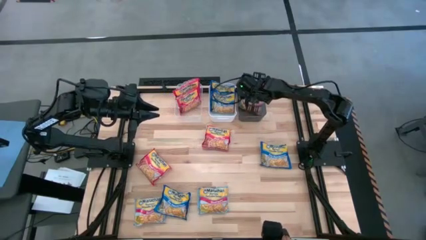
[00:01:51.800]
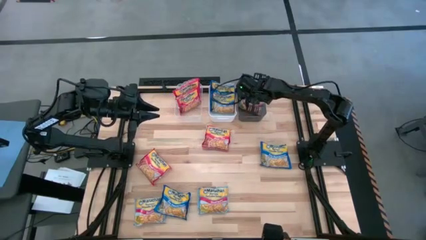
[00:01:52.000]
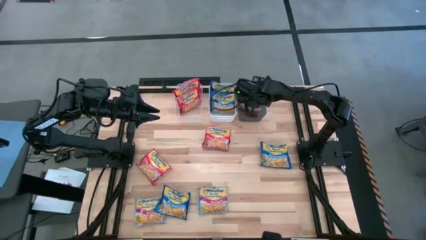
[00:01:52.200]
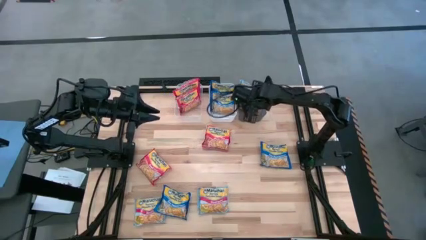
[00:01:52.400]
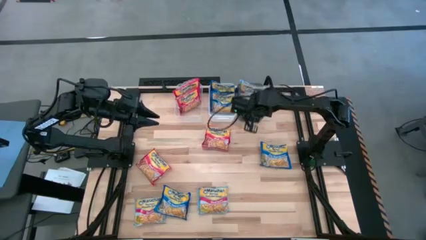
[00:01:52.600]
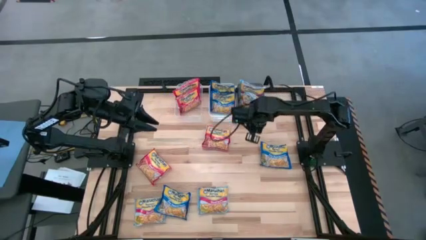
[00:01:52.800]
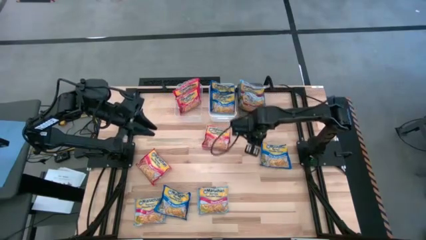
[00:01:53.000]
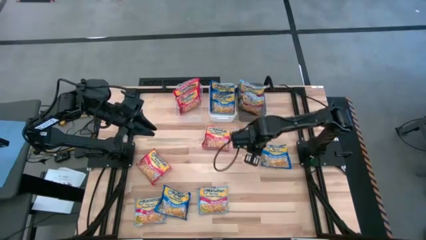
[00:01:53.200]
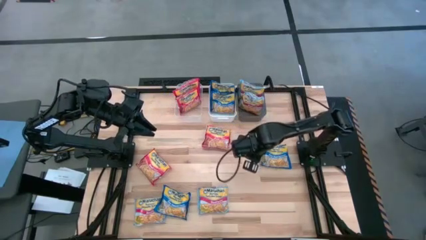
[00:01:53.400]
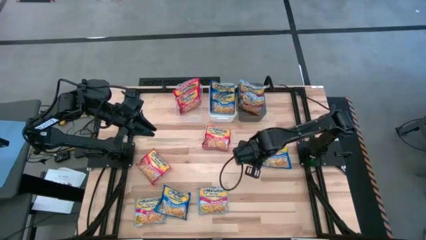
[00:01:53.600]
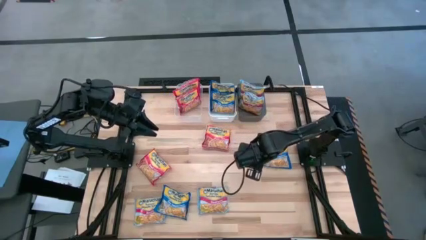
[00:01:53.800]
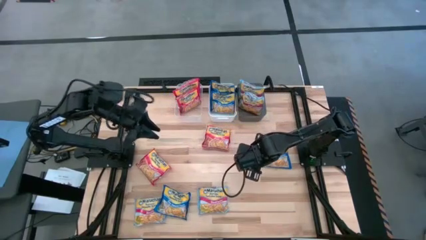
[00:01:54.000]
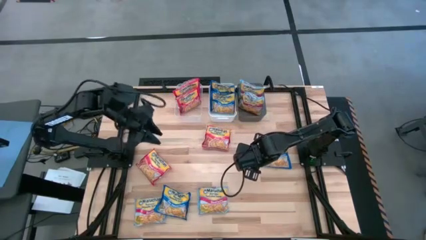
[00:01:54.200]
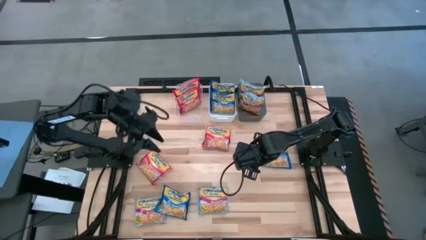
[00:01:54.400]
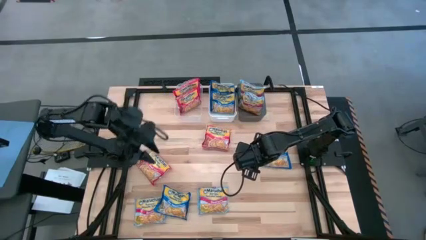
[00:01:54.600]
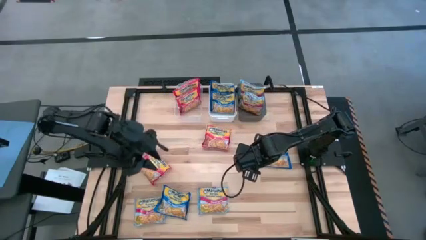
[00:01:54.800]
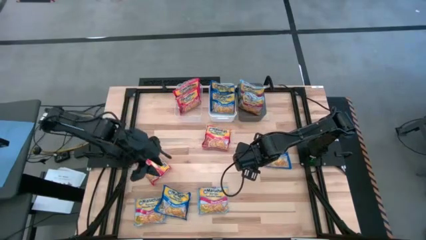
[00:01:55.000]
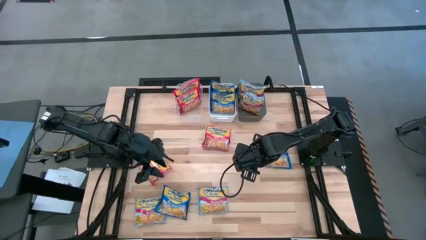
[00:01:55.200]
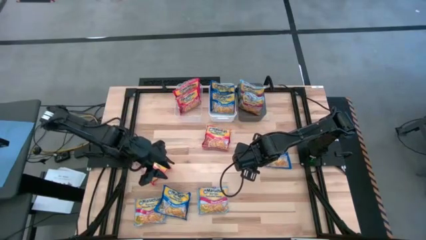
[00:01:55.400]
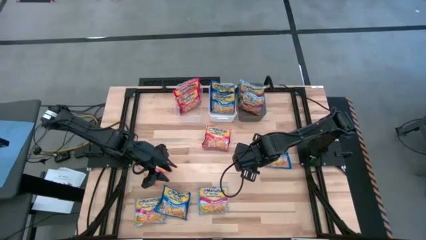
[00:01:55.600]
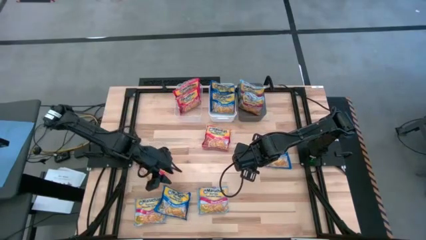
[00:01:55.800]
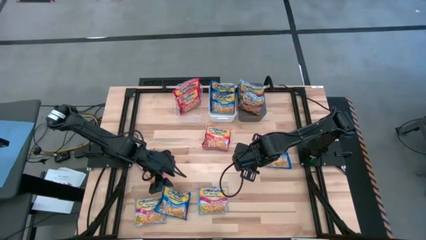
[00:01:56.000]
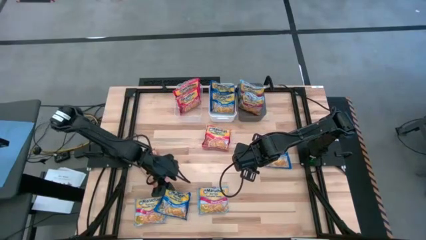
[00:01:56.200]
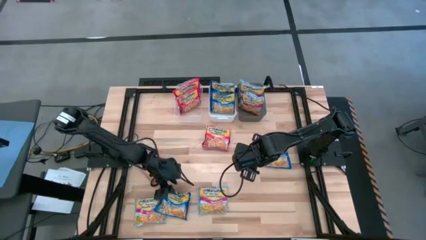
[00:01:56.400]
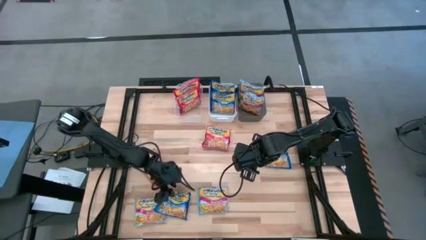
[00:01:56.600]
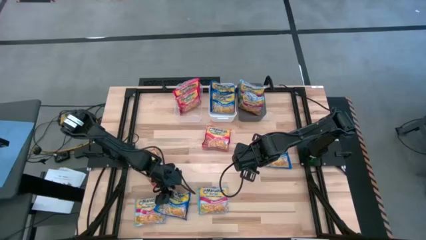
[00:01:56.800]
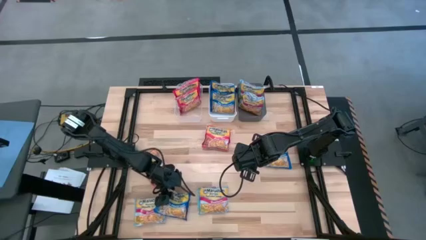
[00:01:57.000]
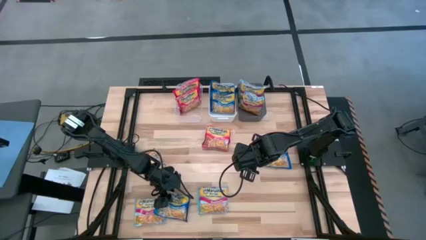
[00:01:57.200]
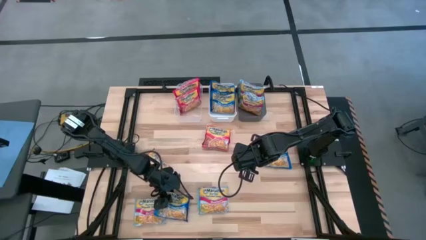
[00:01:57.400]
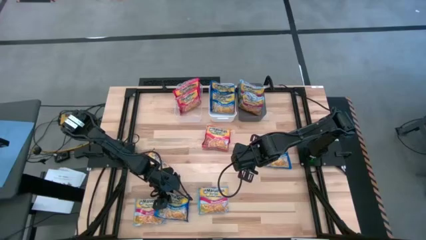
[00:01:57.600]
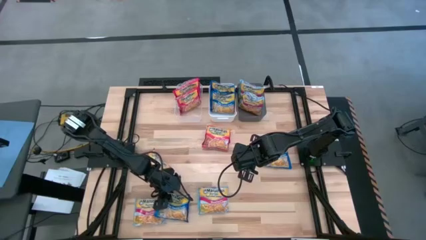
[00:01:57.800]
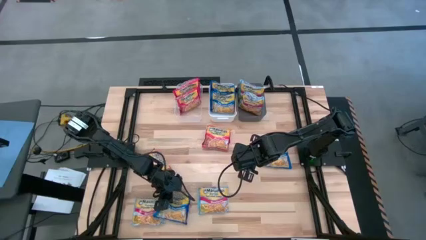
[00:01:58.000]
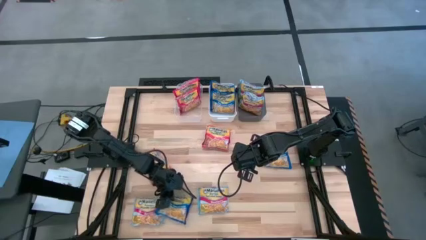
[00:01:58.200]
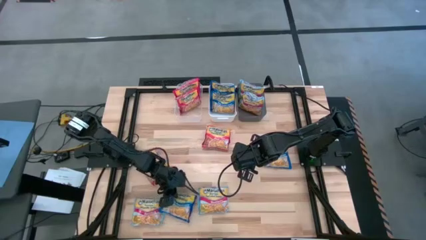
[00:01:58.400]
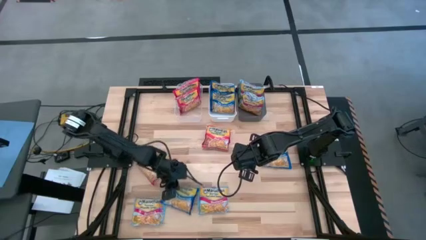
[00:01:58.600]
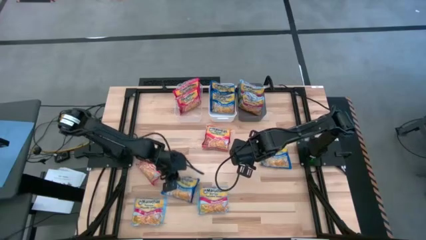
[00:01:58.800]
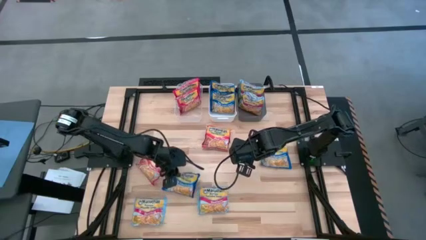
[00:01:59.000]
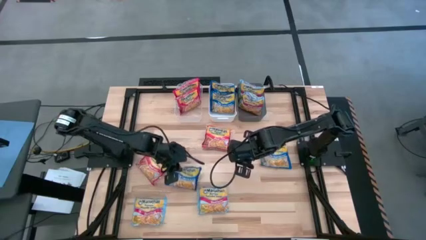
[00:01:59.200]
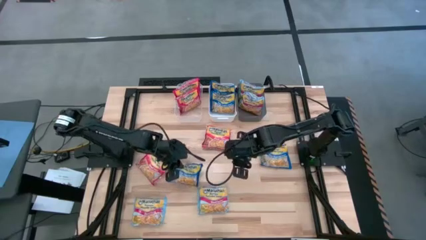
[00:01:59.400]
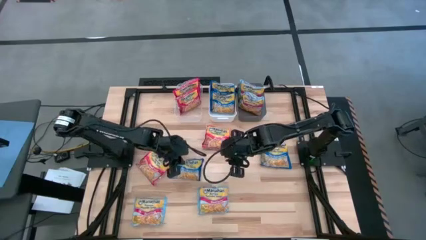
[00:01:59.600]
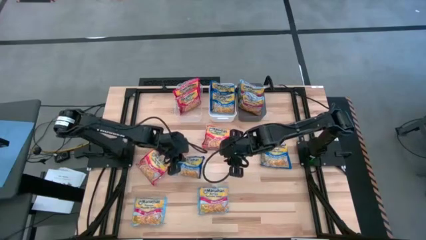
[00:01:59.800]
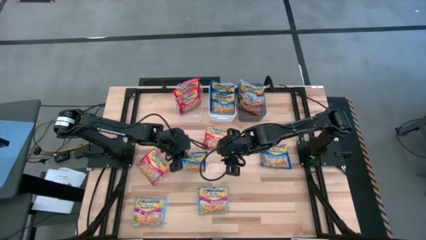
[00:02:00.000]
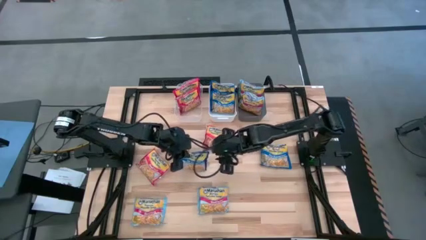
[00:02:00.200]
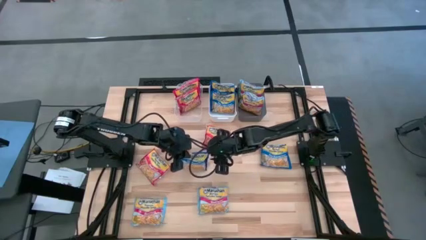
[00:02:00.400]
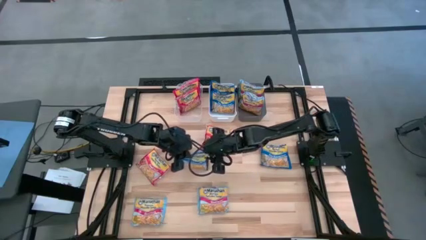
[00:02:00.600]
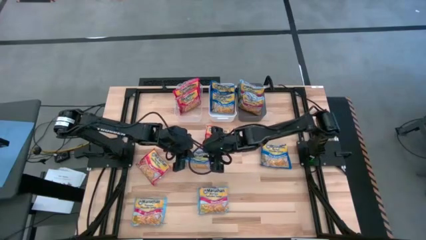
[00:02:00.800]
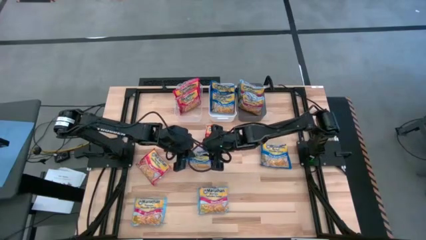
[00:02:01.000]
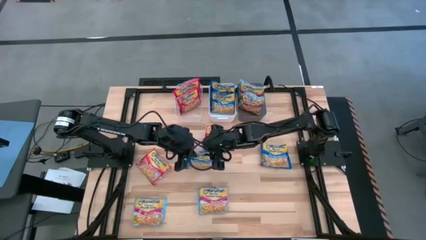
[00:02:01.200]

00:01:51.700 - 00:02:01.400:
Task: Sort Maruchan noodles
Put the blue noodle pack into the white bin

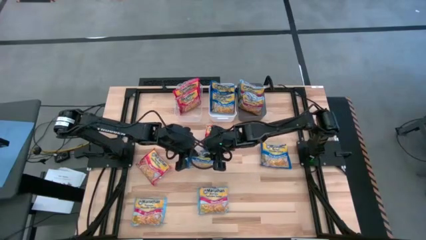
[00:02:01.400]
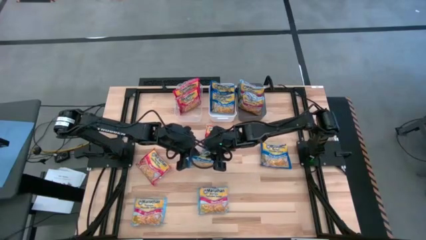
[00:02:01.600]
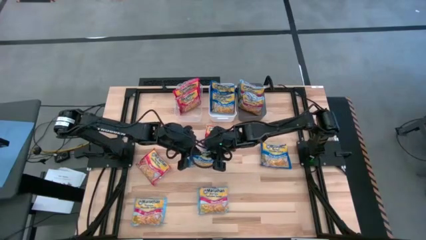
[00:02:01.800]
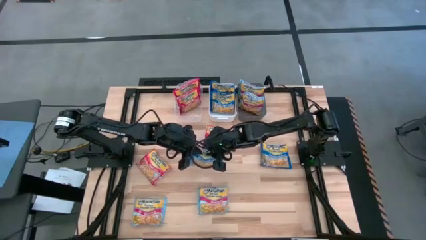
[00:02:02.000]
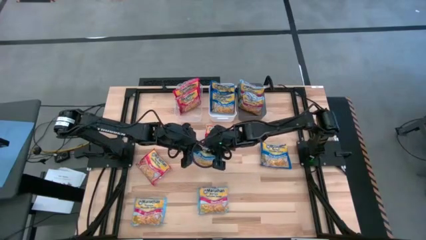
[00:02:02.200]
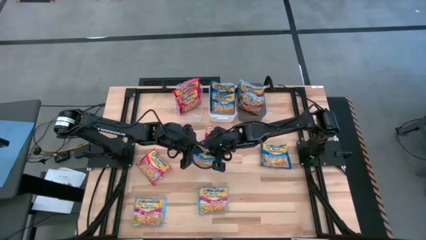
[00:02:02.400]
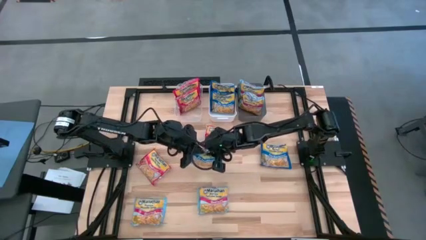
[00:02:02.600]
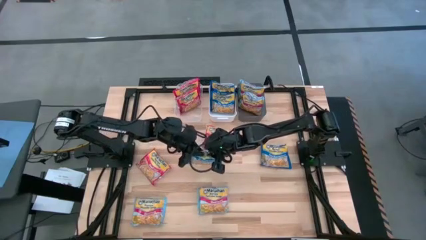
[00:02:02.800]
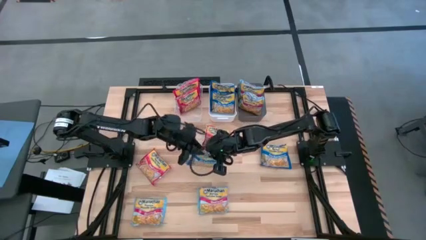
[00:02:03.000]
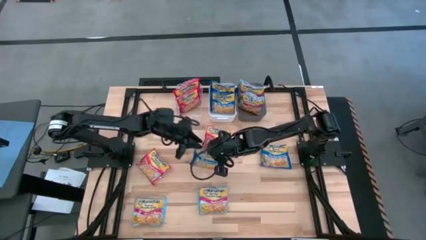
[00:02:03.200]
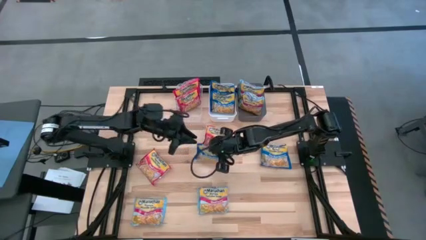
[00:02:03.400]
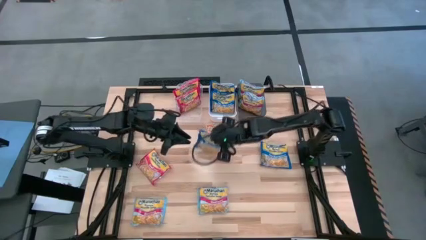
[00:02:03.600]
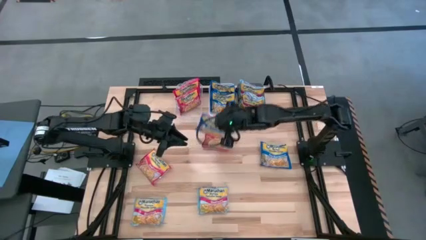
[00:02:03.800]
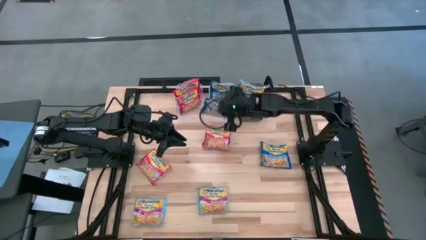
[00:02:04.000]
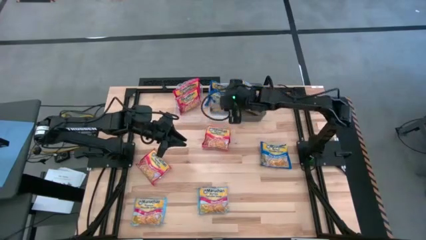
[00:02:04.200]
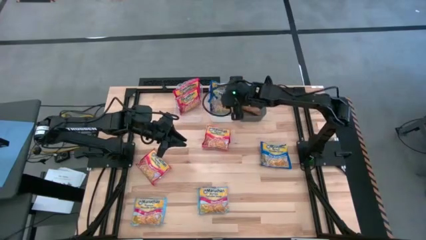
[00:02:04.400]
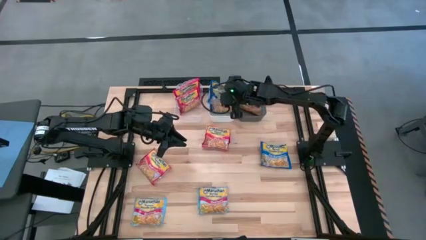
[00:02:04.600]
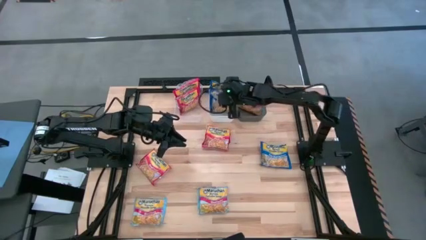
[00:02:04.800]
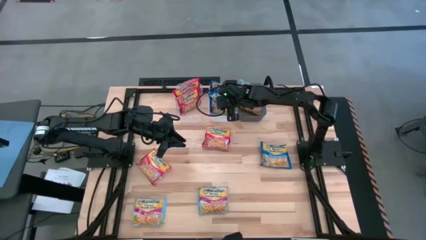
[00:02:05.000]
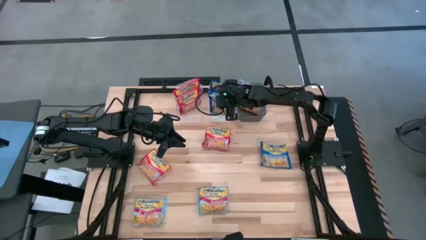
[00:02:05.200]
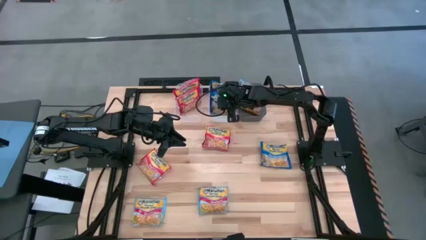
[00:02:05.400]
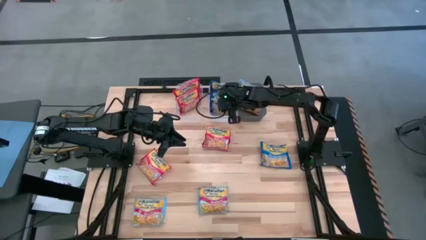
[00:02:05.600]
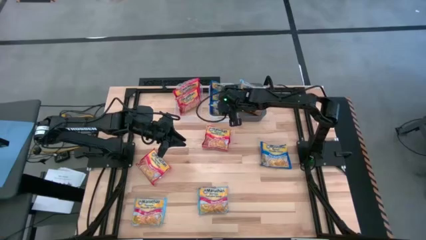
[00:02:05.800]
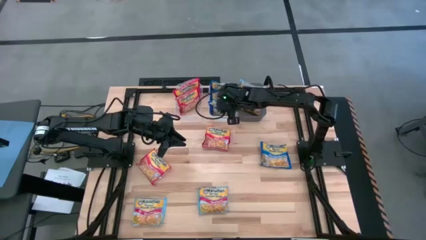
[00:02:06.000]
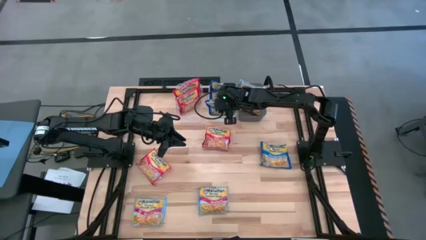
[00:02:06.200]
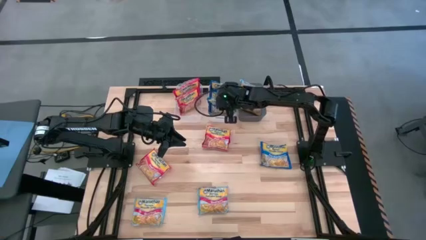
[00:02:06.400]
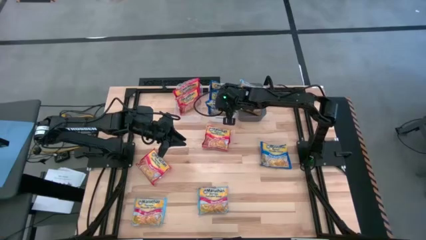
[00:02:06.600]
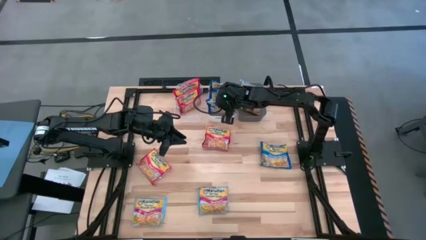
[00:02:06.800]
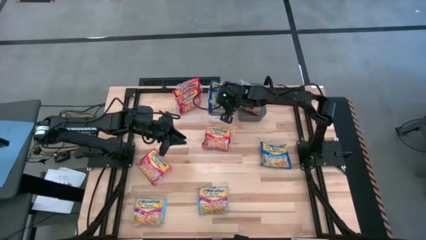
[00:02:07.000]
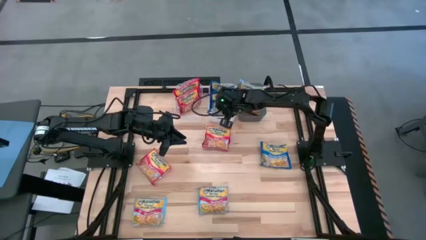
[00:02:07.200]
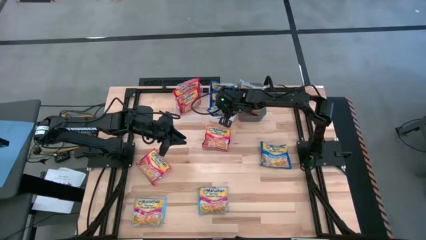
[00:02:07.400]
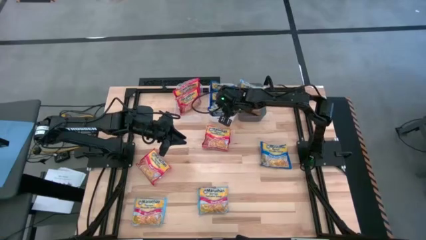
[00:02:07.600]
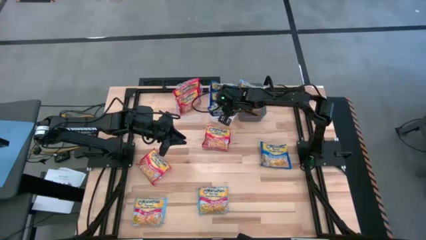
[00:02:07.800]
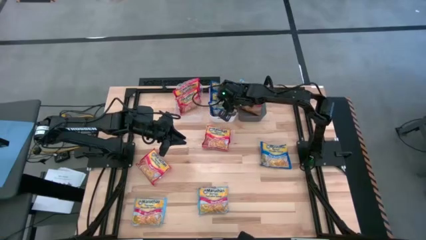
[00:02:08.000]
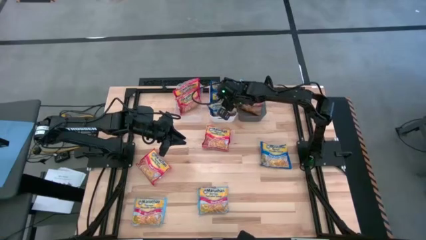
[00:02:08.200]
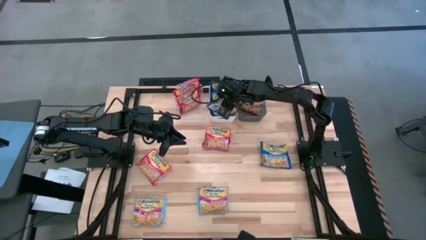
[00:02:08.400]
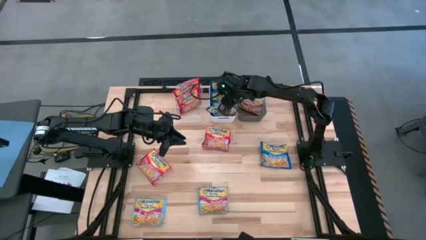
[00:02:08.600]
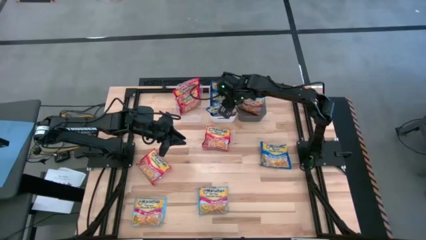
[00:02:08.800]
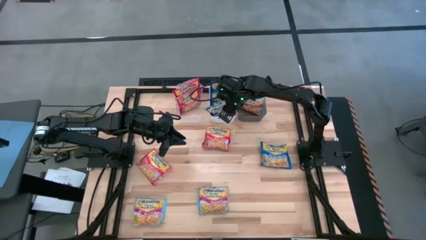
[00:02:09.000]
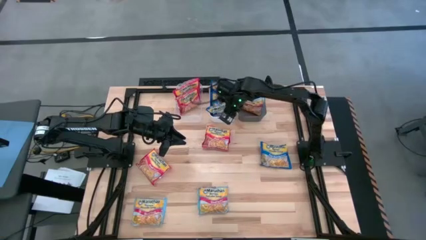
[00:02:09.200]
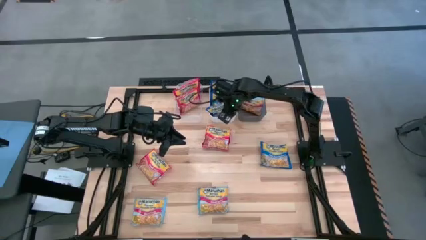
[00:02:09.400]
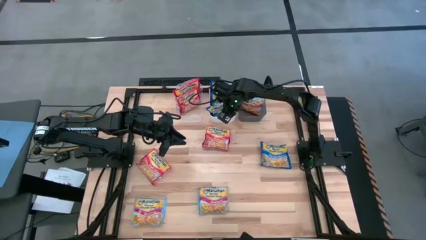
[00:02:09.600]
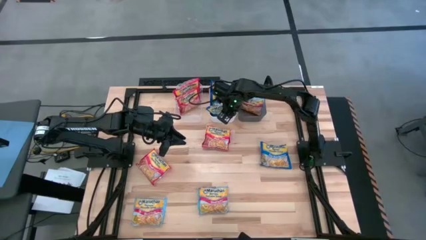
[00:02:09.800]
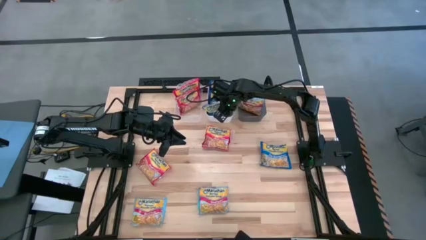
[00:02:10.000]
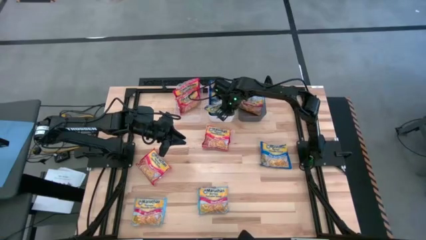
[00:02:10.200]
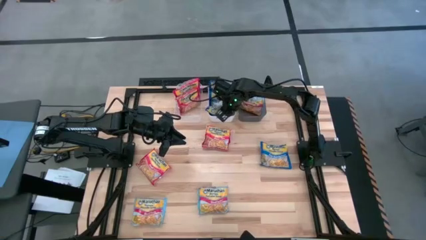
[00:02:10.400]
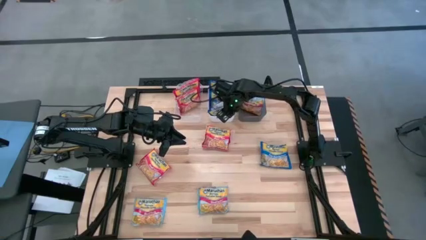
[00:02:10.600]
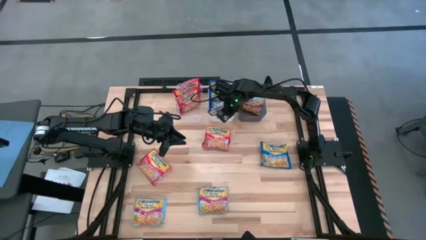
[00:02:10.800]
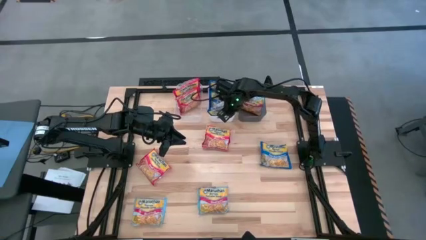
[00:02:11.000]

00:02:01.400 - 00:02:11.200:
Put the blue noodle pack into the white bin
